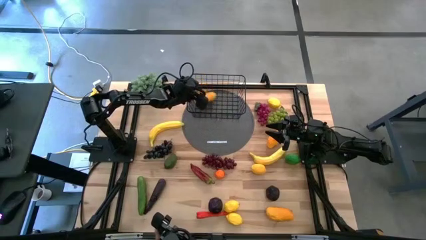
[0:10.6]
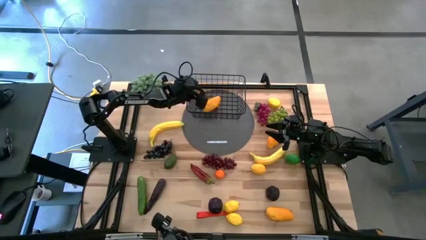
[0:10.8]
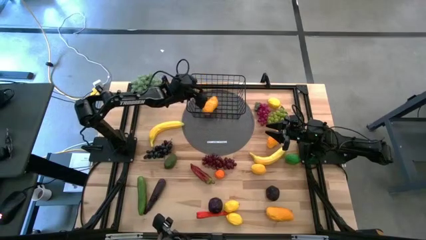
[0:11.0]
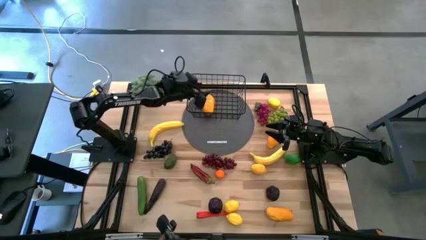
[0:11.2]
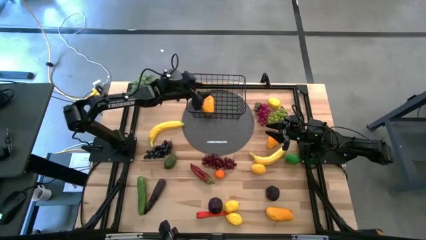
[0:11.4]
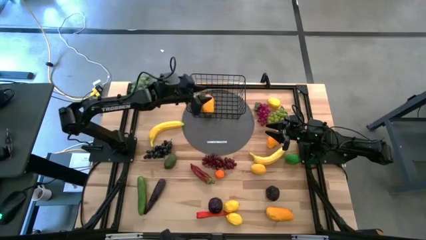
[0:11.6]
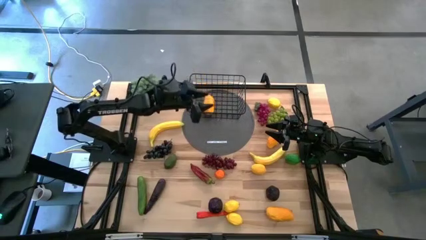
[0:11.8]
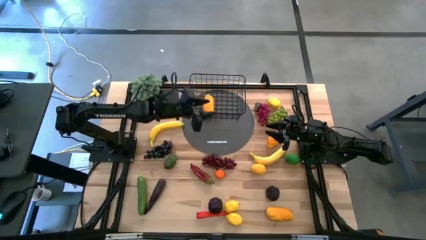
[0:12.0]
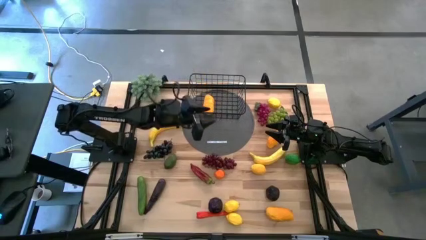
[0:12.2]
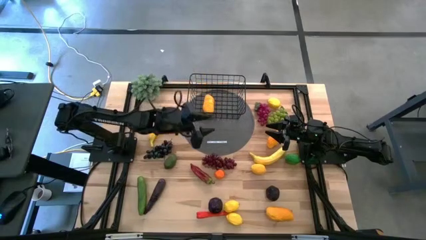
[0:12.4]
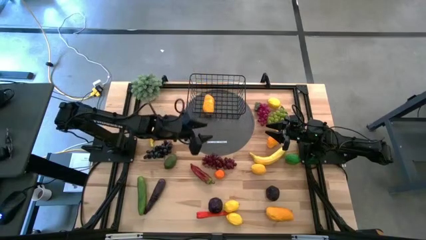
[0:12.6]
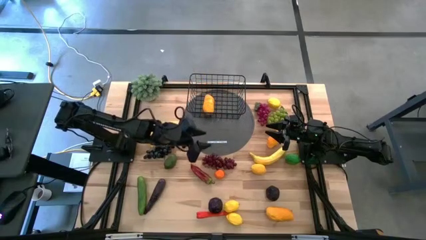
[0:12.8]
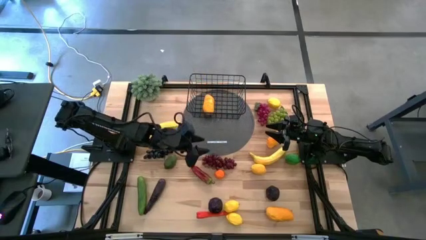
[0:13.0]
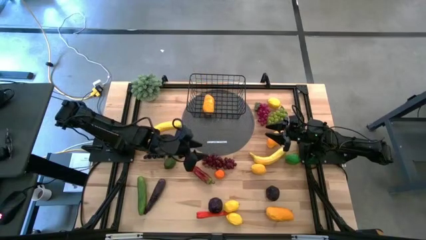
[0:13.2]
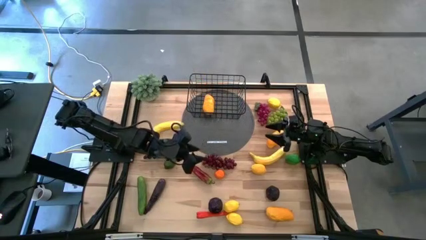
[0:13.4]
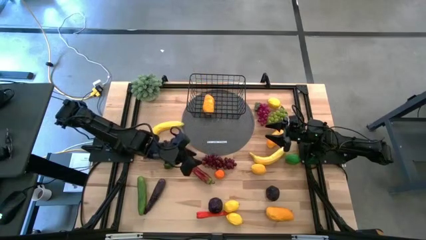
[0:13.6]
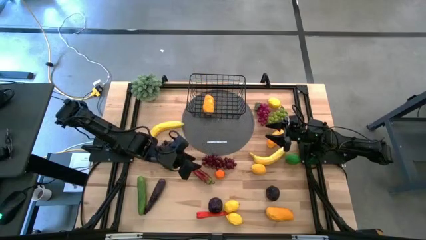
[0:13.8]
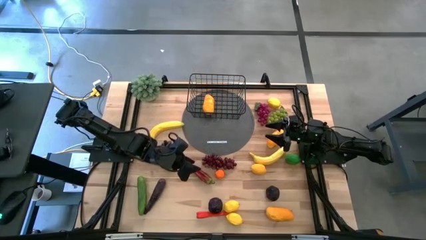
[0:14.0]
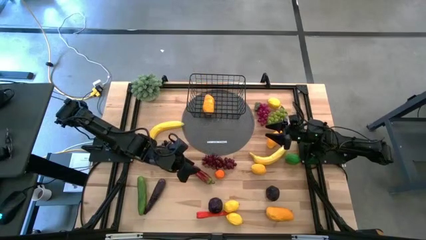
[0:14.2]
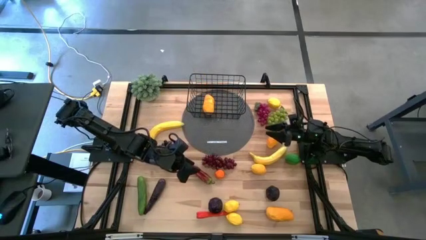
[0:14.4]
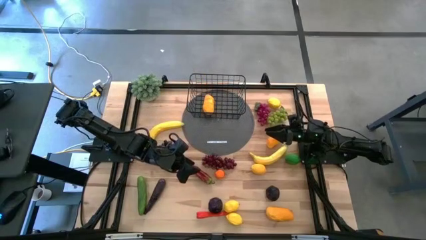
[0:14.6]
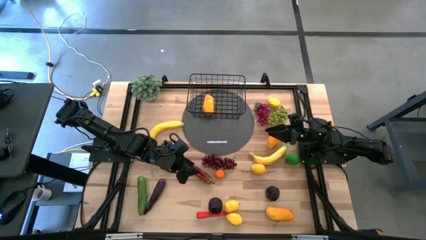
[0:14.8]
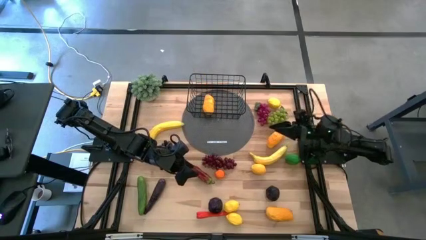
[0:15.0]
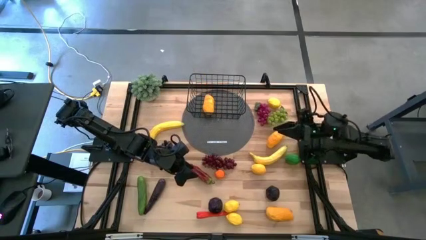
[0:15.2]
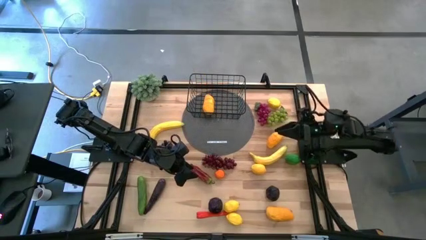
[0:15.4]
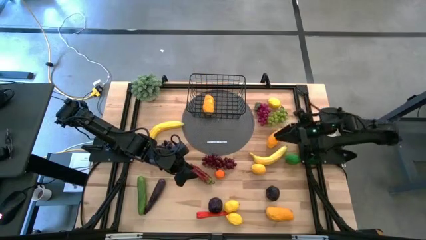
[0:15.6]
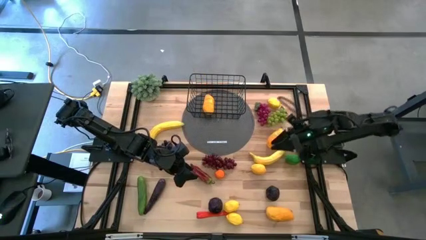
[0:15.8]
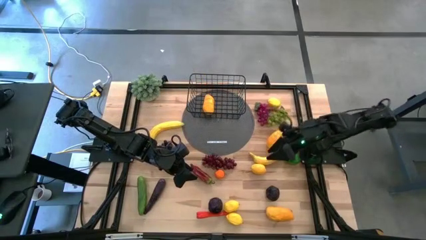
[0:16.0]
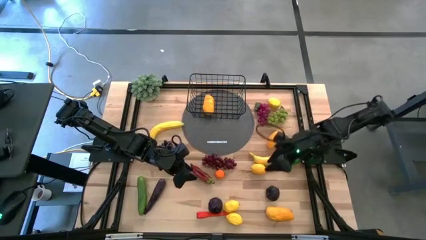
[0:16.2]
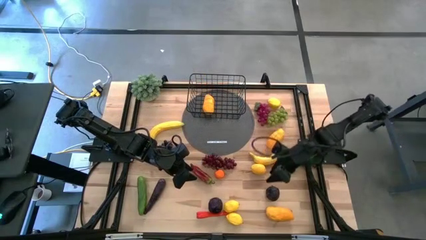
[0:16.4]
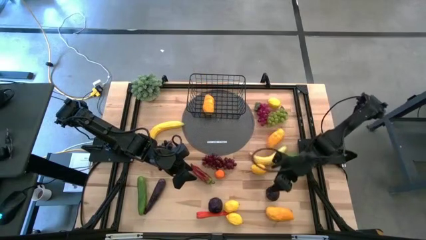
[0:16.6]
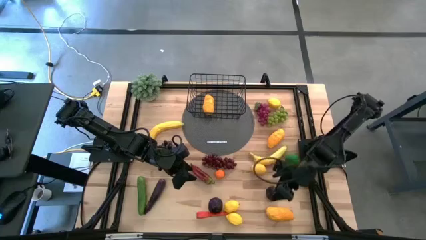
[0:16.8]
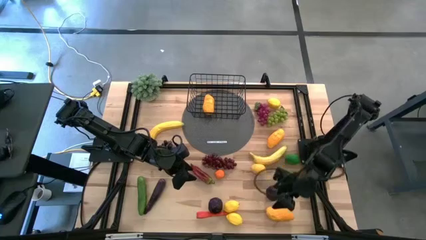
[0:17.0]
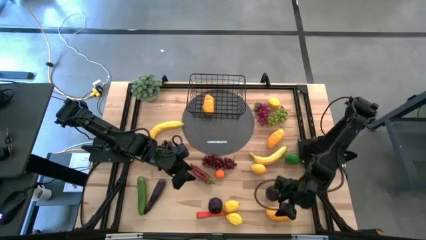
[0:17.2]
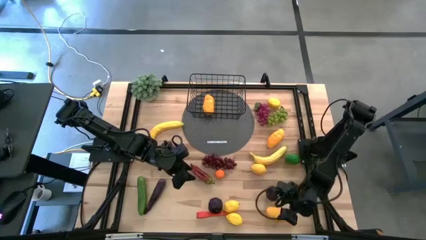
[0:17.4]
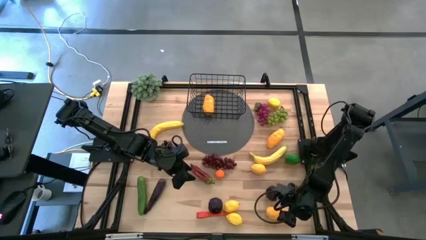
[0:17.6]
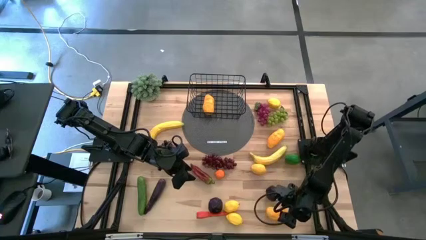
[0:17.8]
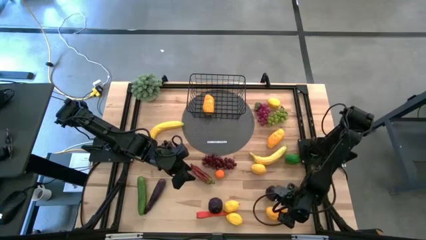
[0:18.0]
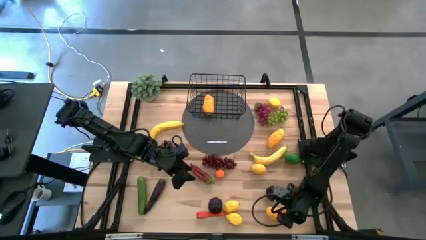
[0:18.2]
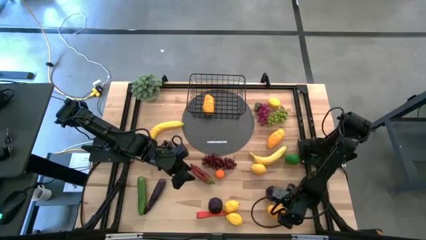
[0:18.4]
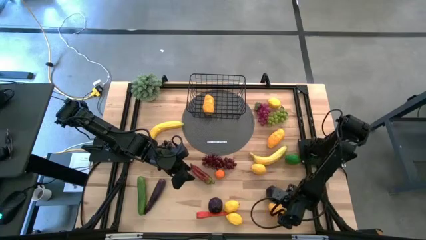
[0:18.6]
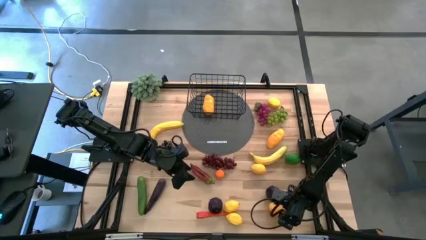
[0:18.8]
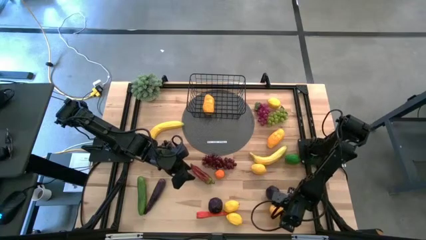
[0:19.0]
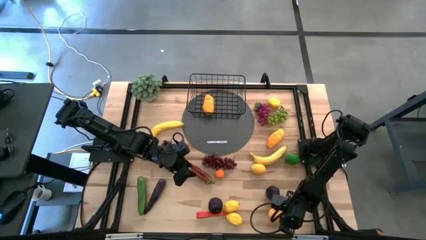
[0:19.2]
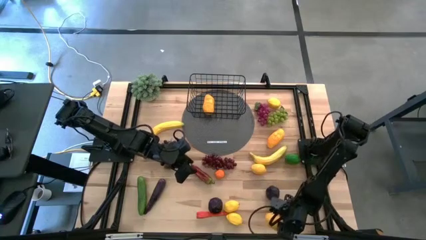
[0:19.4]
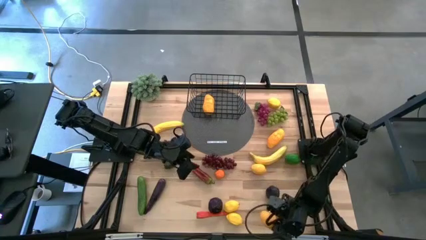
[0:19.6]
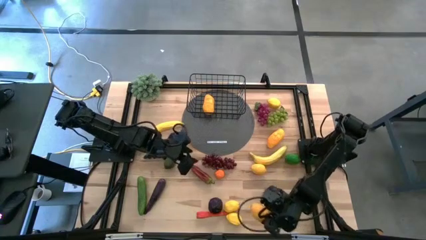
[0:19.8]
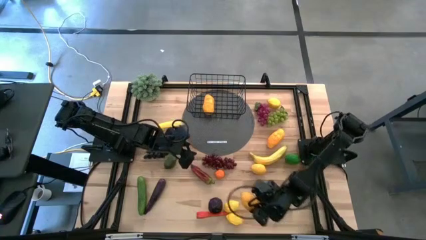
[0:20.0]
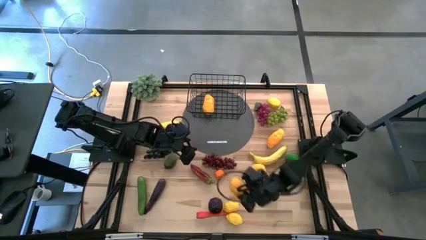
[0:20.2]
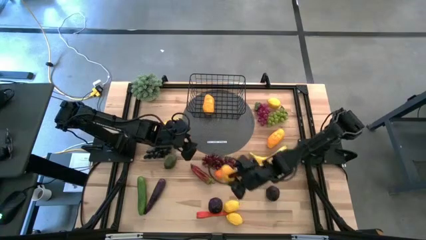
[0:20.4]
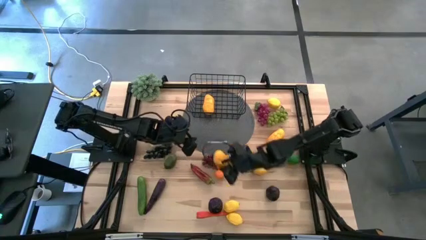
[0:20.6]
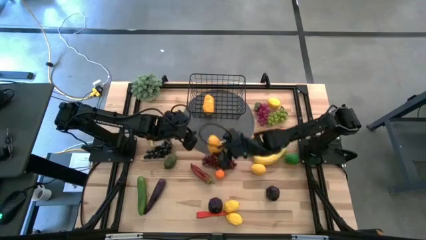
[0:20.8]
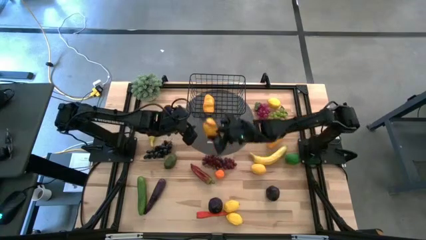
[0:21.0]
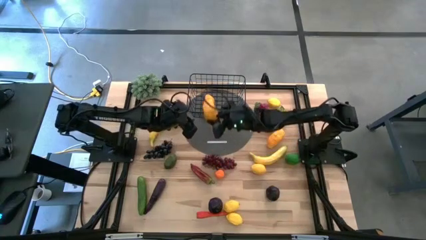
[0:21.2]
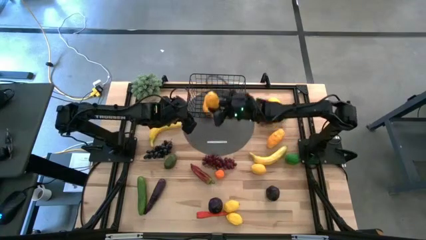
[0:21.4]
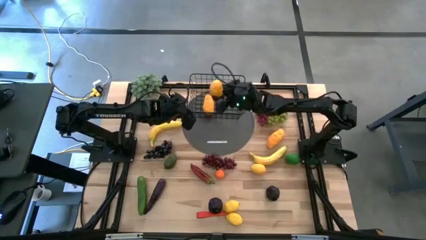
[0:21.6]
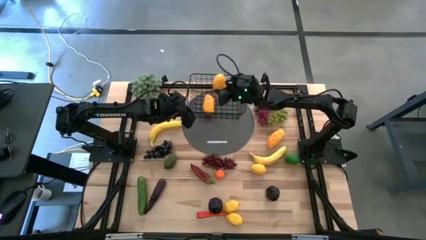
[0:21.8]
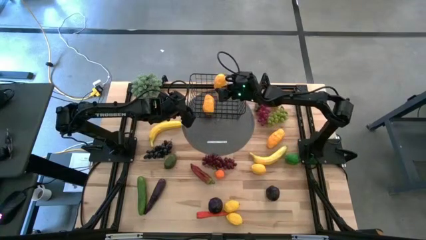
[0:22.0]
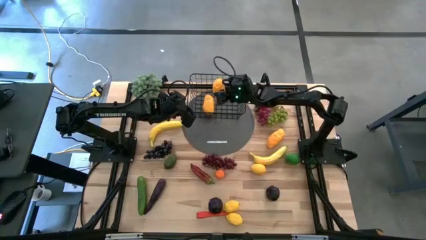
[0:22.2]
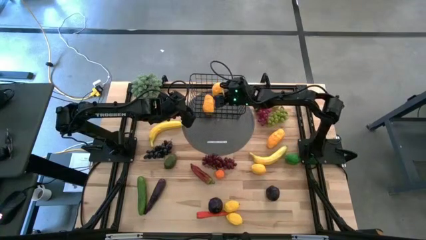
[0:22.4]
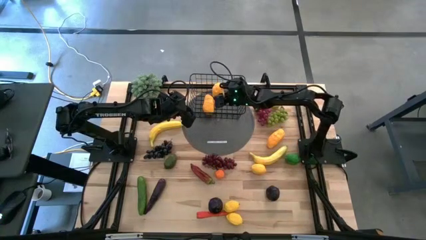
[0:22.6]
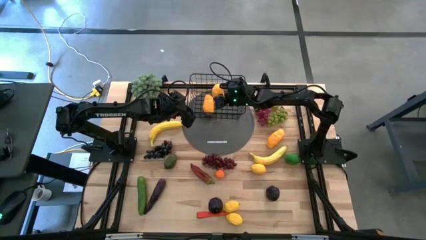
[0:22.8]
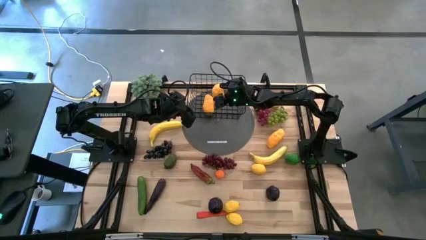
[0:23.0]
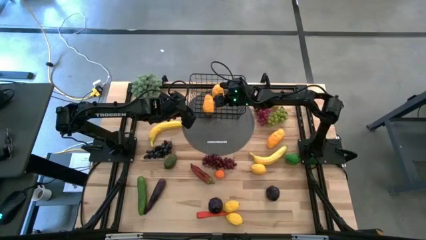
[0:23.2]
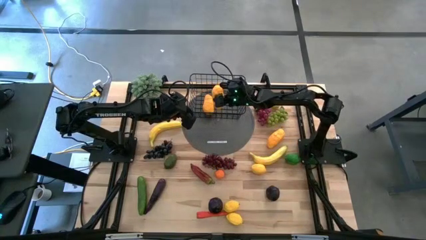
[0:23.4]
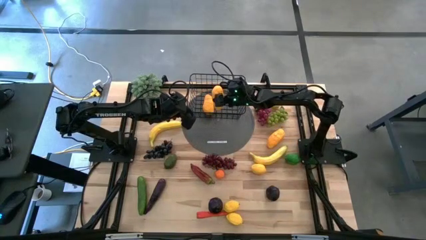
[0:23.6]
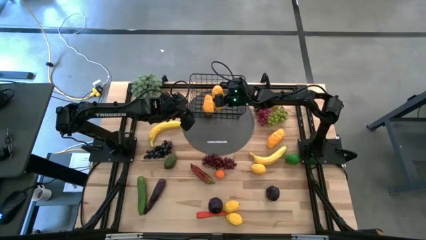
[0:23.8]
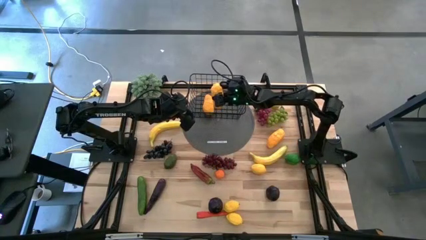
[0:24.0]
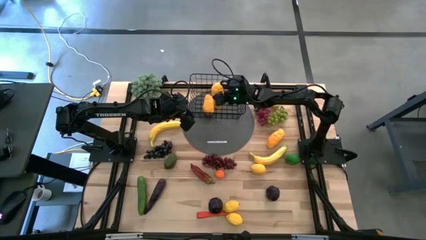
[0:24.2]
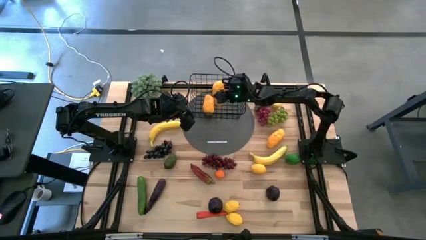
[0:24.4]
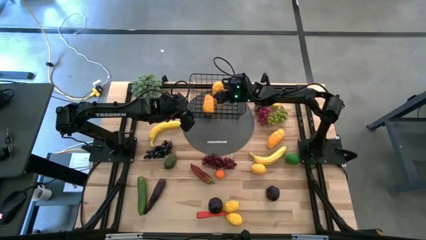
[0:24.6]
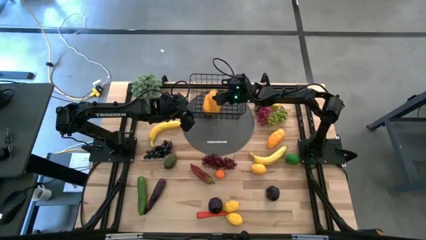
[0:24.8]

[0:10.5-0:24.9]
Task: Build produce basket
Put the bottom yellow mango into the black wire basket
